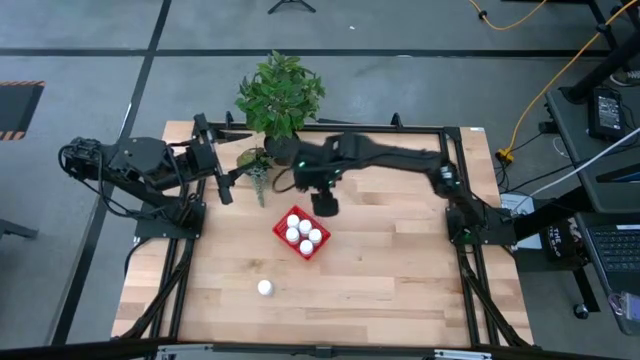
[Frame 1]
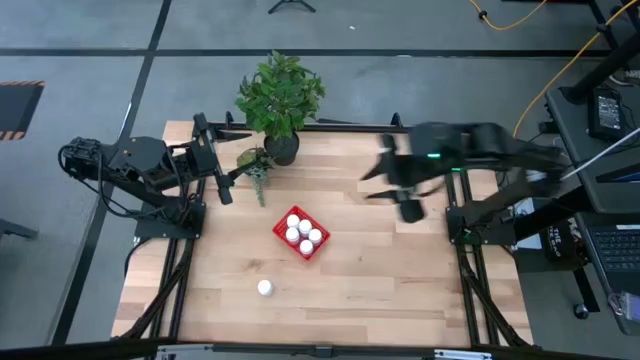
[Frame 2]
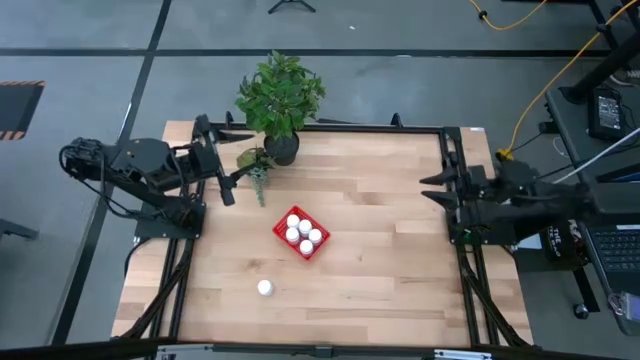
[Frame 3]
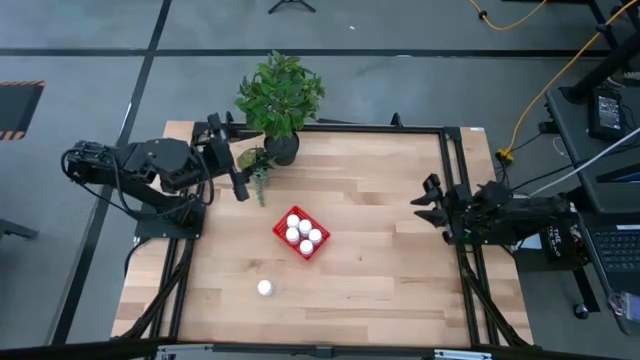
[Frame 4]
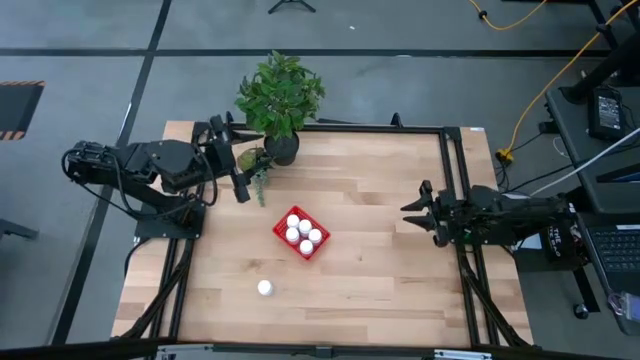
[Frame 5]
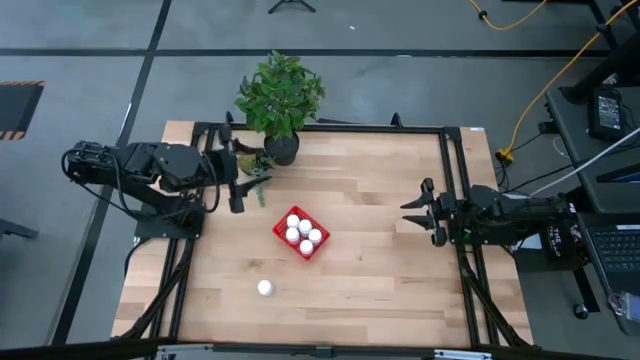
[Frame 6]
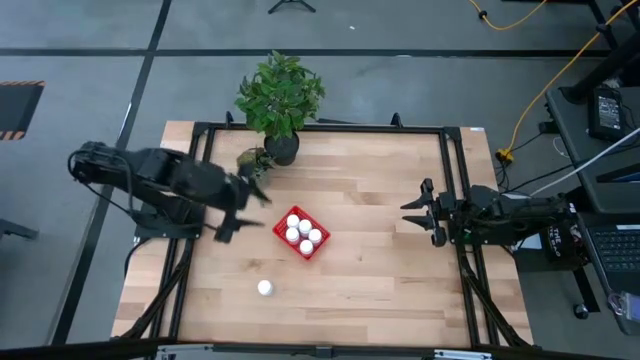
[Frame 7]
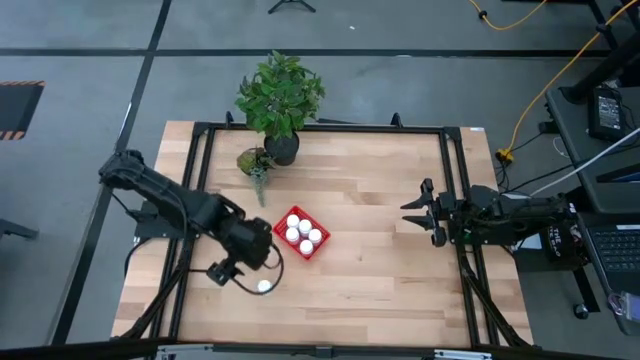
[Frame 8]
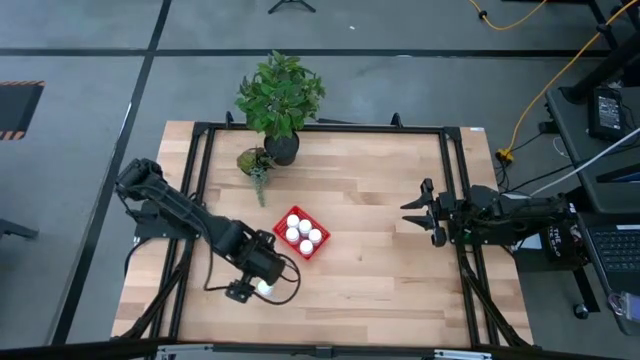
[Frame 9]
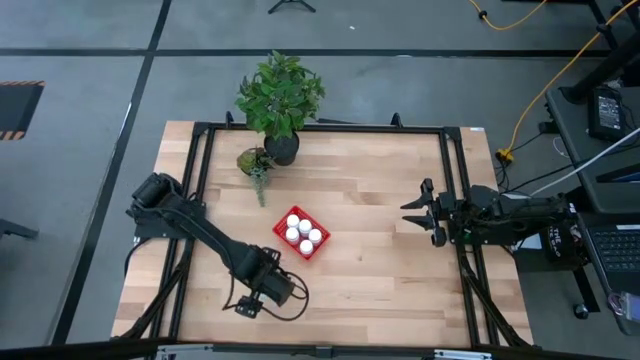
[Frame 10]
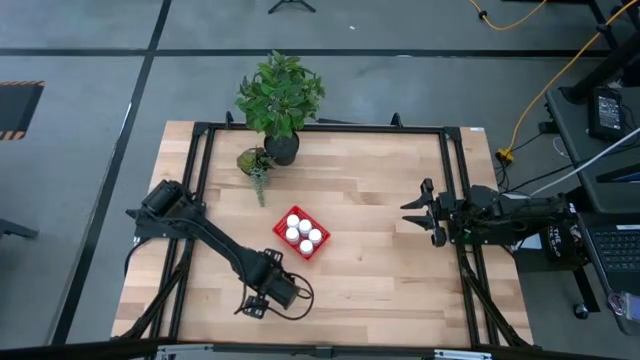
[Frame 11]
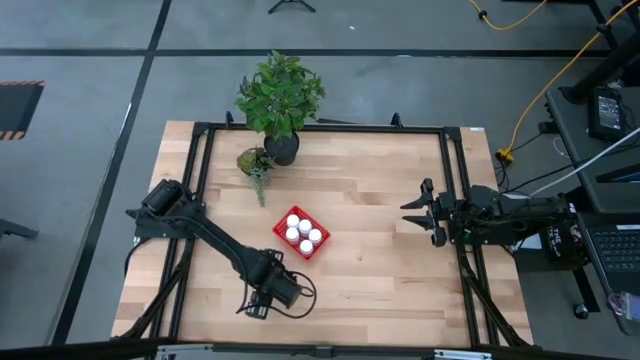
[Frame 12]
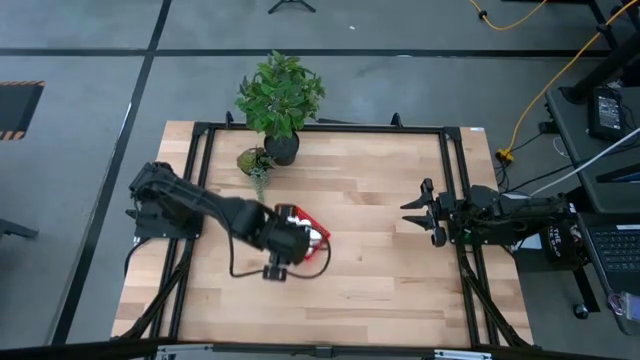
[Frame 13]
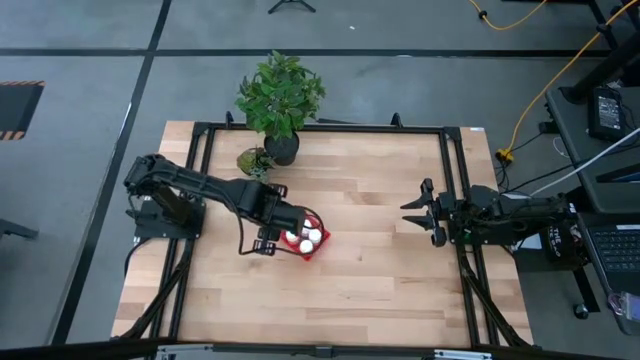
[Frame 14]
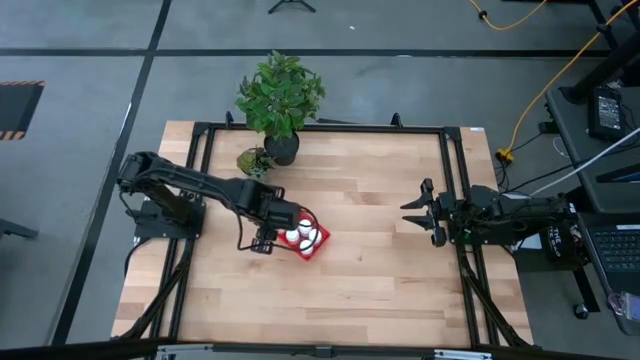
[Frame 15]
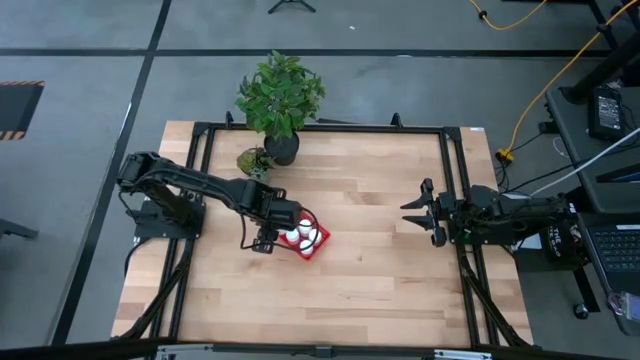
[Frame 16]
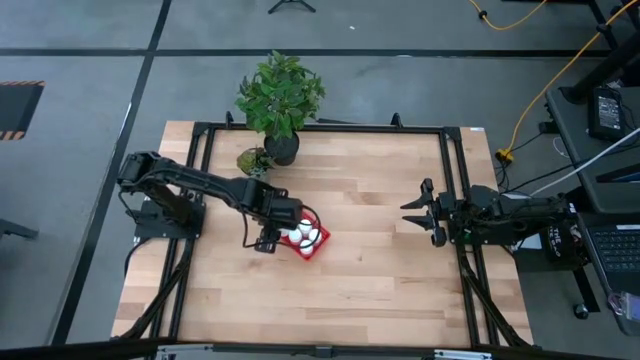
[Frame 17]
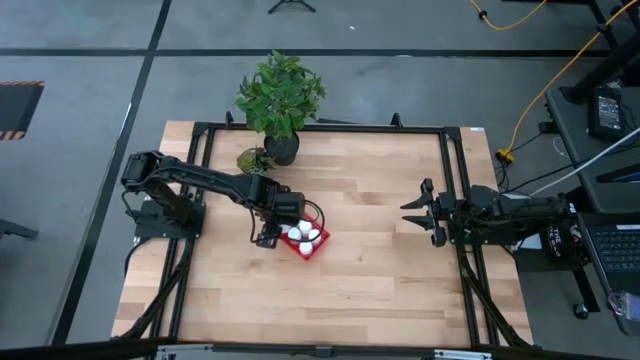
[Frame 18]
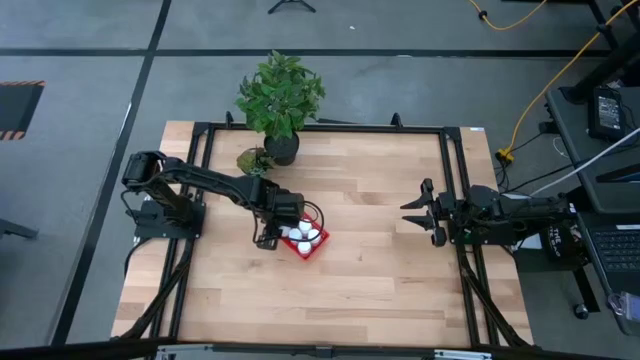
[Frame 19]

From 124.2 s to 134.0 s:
Task: Pick and place pill bottles into a basket
Put the white pill bottle into the bin

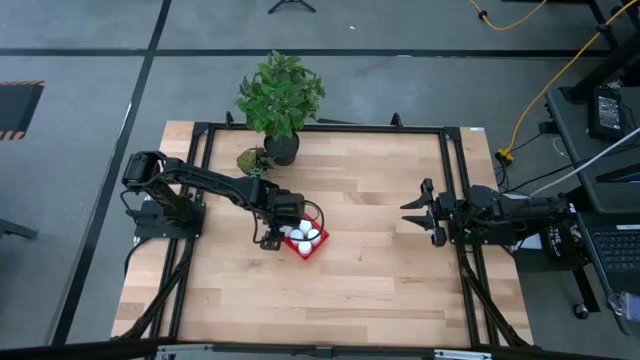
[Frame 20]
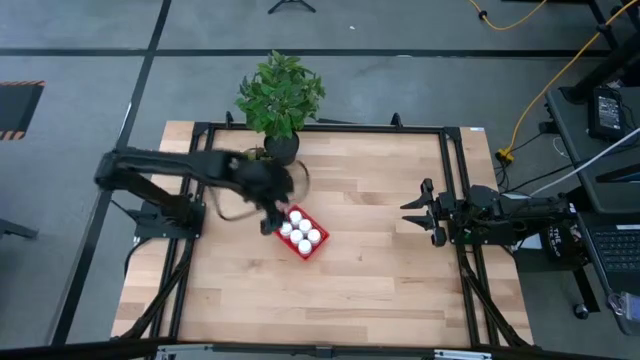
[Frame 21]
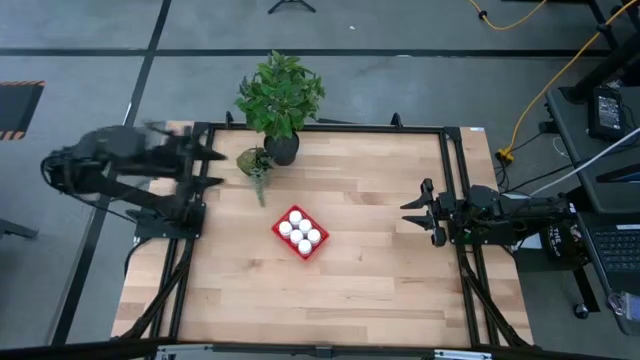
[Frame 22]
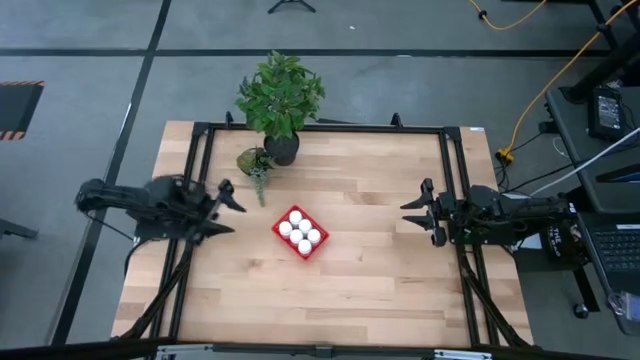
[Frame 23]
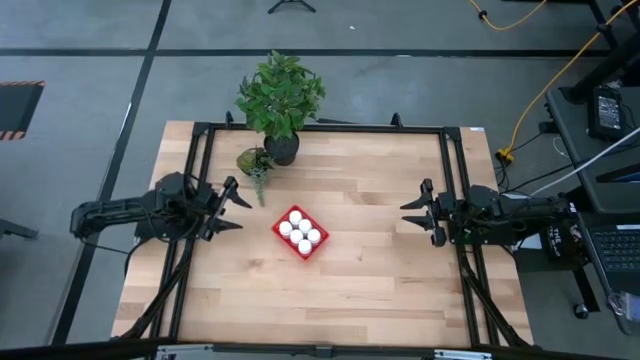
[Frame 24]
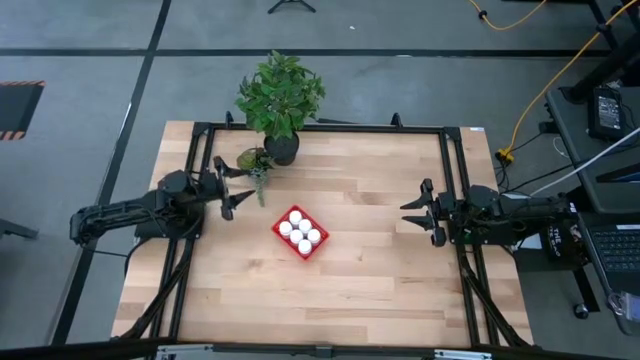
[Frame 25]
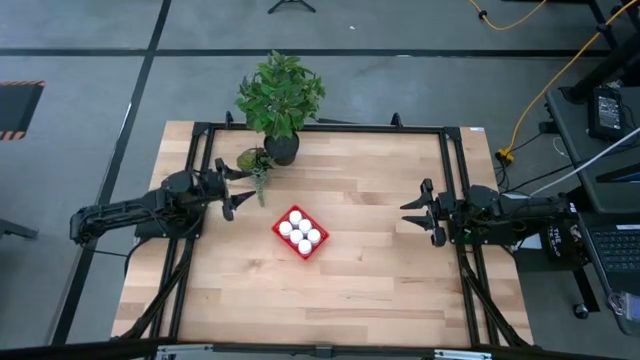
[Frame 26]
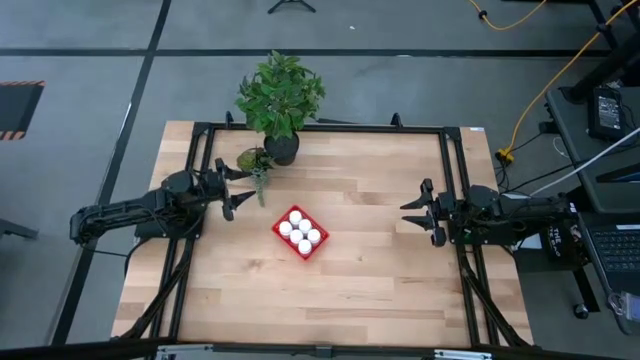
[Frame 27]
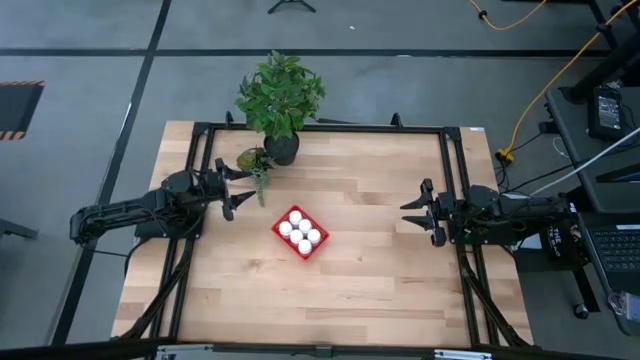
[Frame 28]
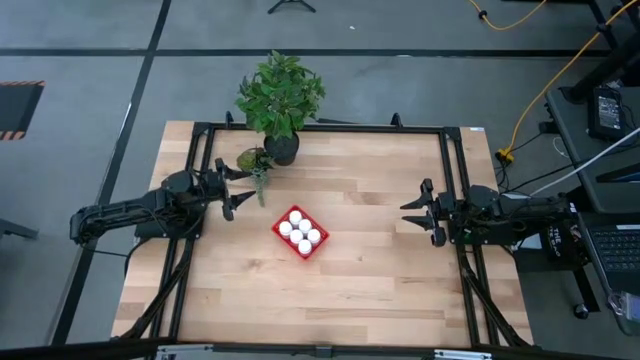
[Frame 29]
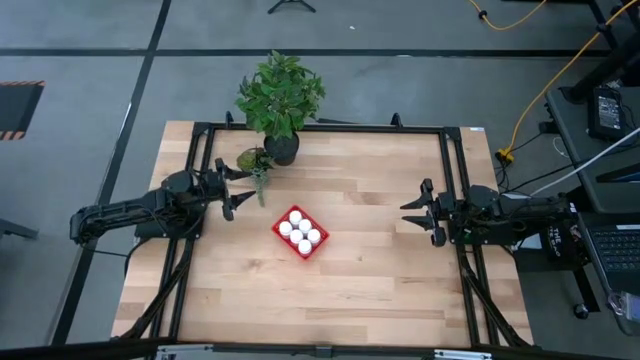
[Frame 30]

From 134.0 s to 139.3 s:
Return to home position

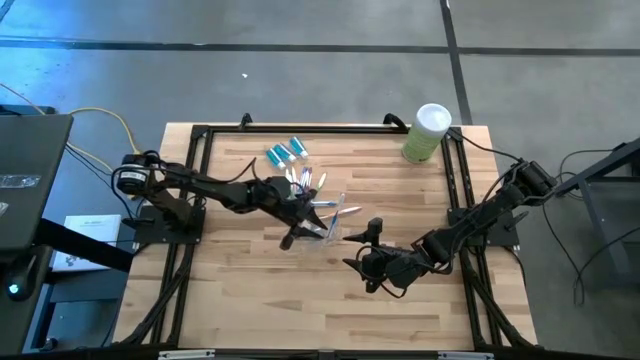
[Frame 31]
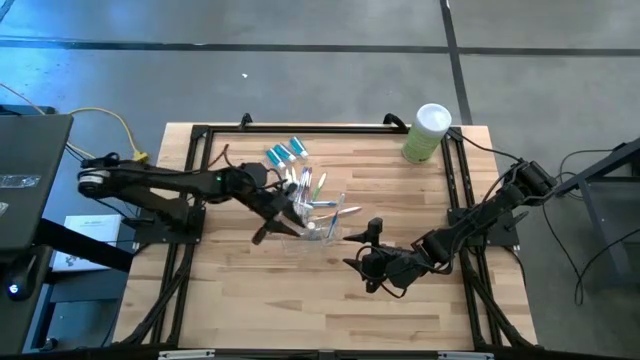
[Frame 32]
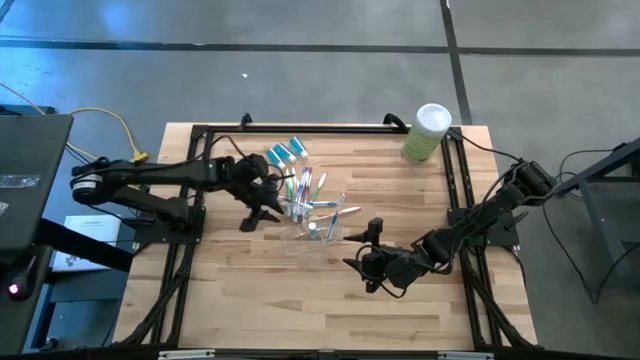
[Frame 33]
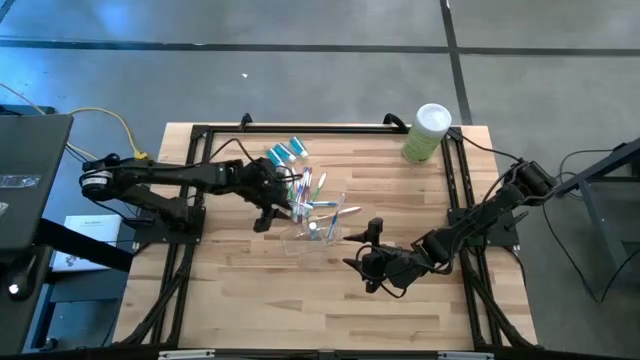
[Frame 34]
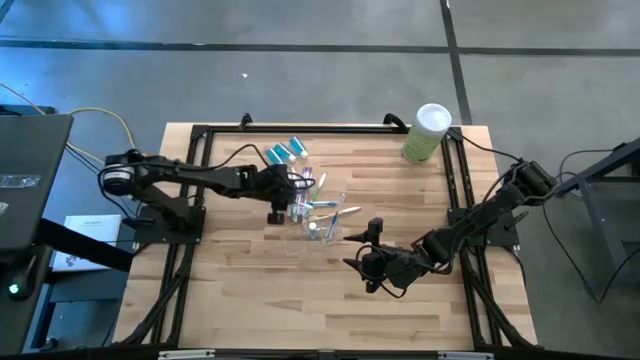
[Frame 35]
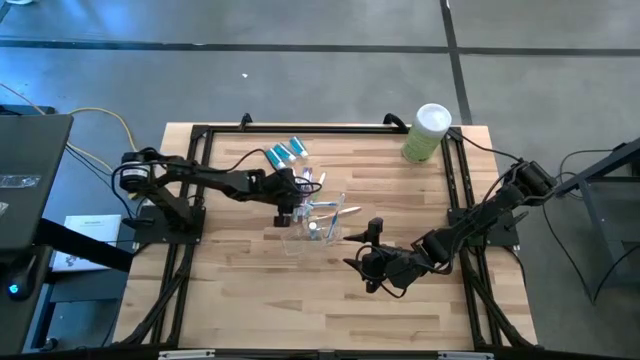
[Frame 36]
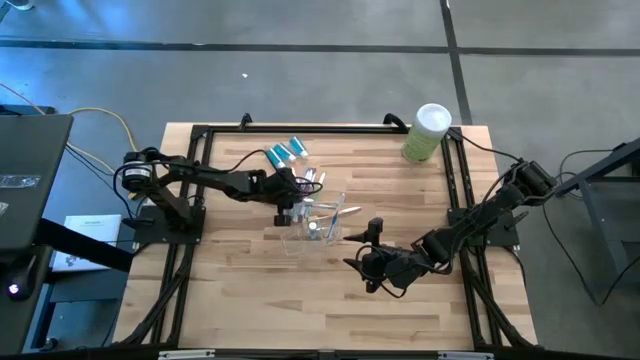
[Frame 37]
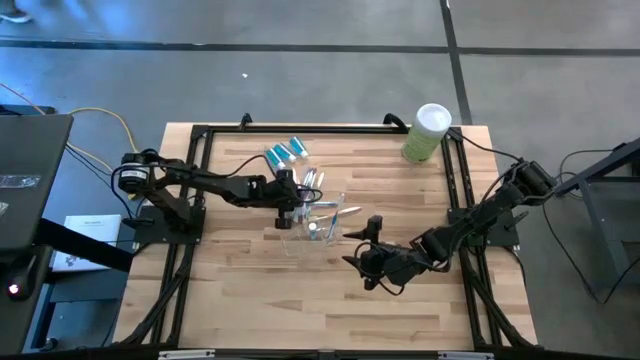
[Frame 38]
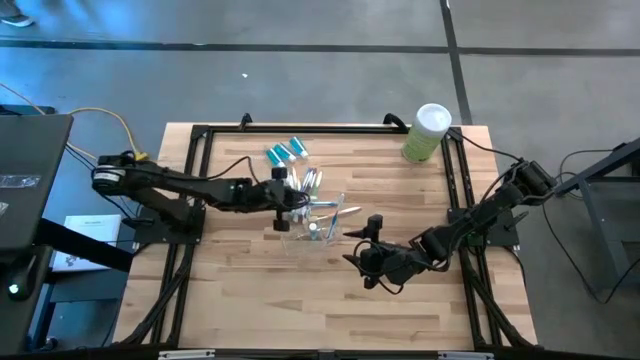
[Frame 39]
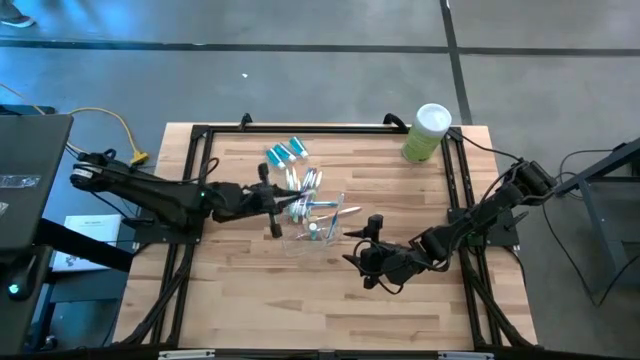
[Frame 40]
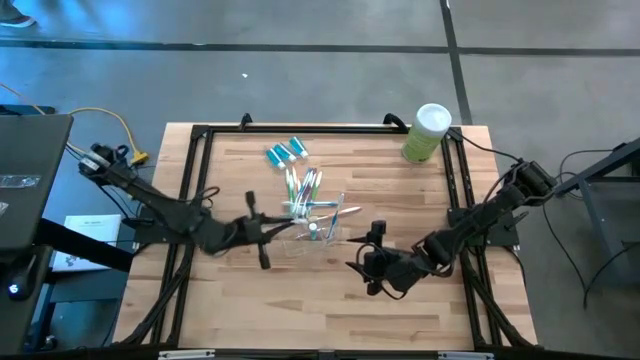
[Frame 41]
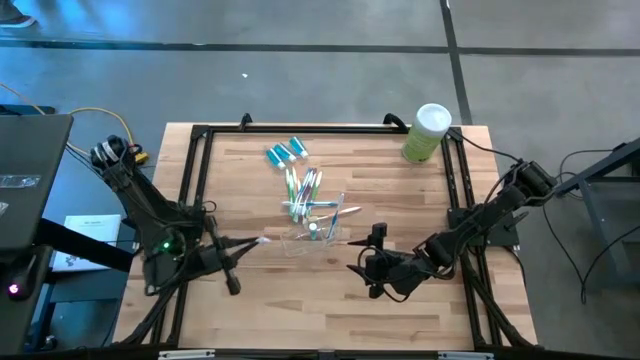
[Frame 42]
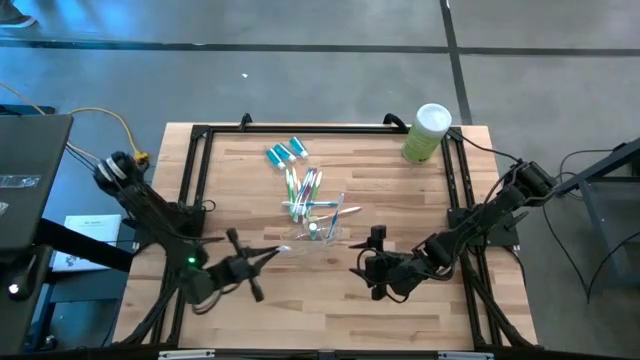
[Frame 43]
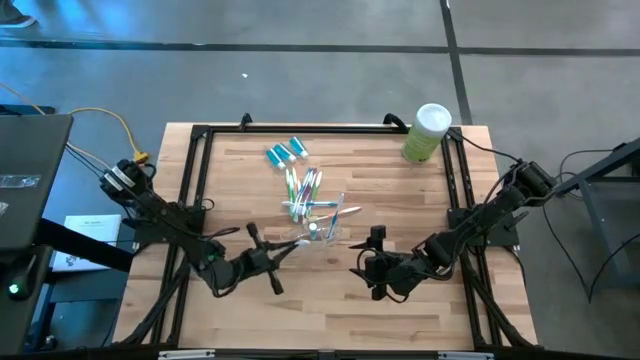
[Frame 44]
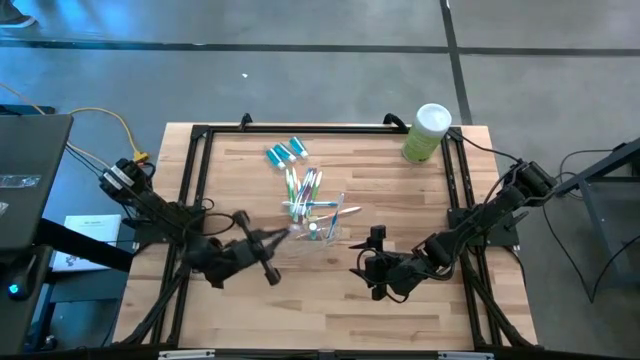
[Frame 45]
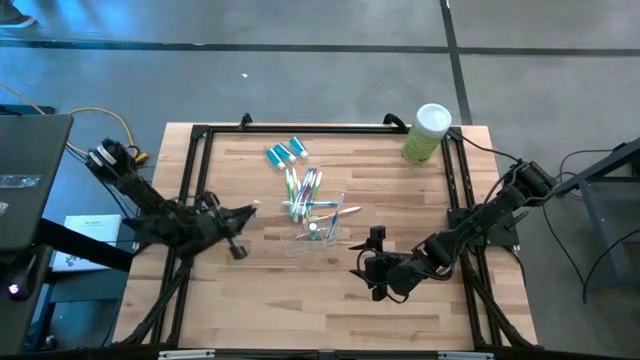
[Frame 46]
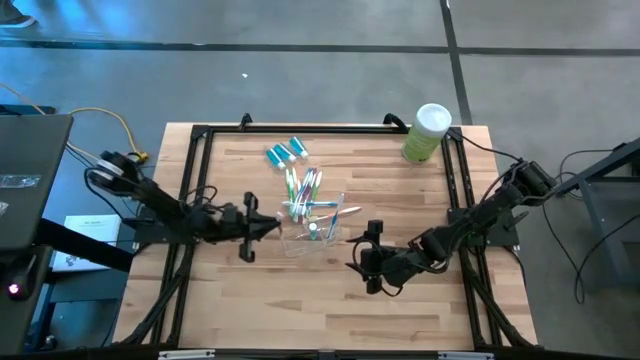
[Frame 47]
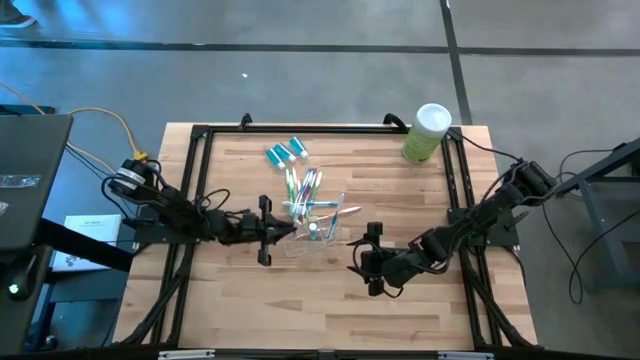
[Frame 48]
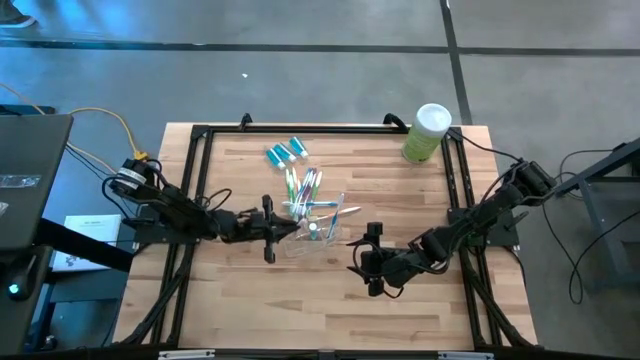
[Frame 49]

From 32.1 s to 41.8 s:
Task: Pick & Place toothbrushing station
Put the violet toothbrush into the transparent organizer
